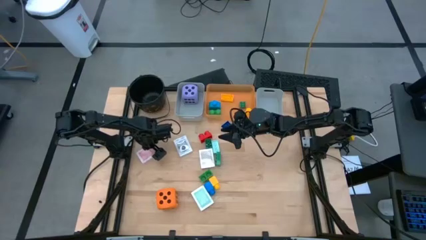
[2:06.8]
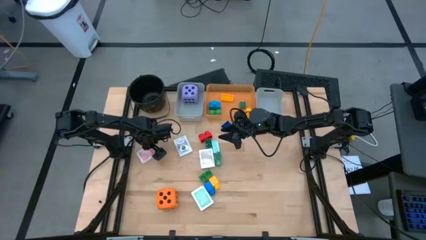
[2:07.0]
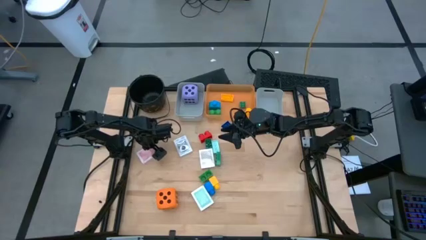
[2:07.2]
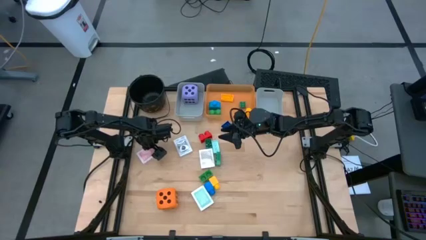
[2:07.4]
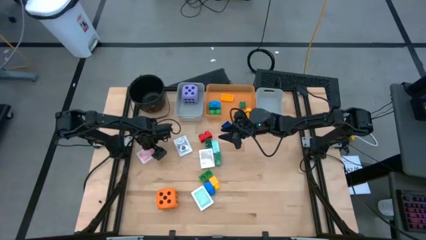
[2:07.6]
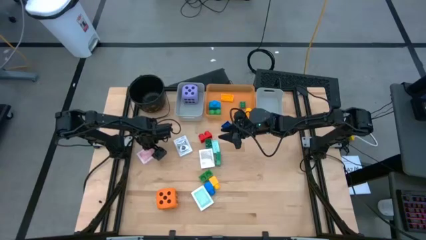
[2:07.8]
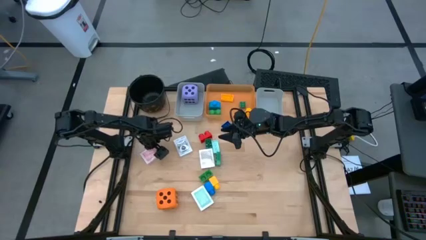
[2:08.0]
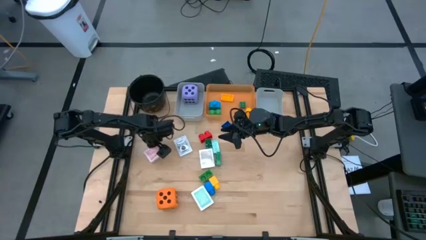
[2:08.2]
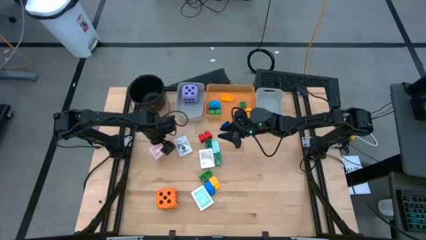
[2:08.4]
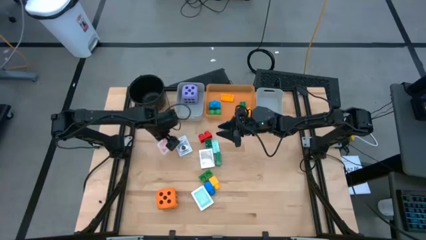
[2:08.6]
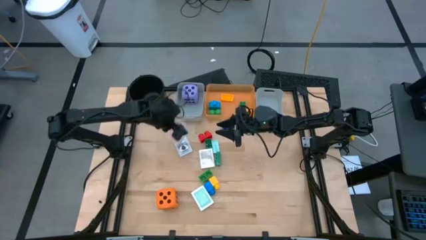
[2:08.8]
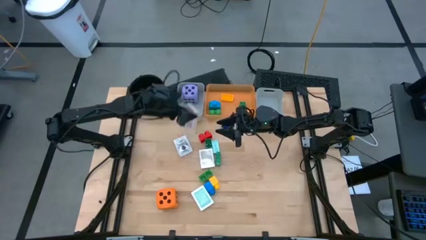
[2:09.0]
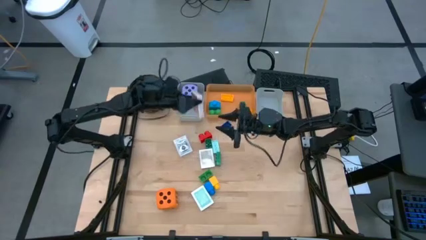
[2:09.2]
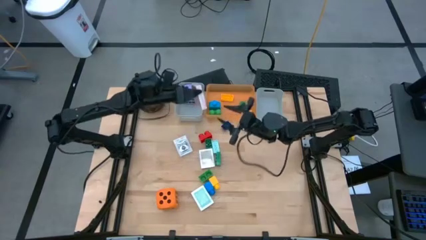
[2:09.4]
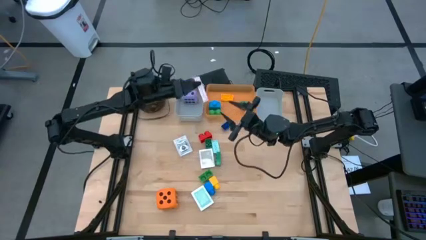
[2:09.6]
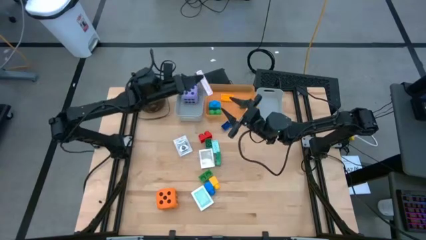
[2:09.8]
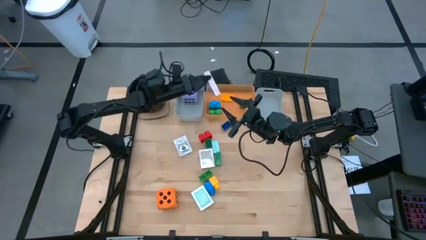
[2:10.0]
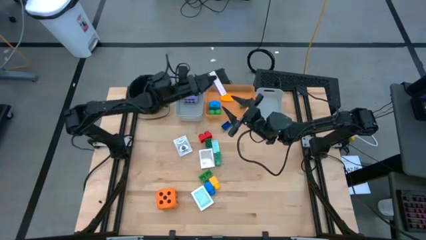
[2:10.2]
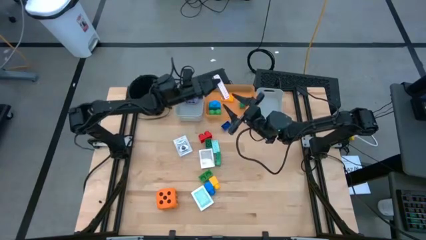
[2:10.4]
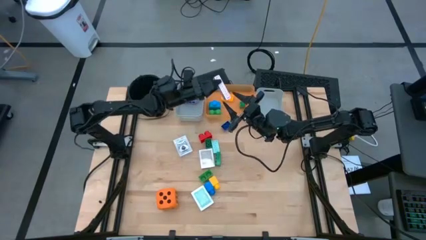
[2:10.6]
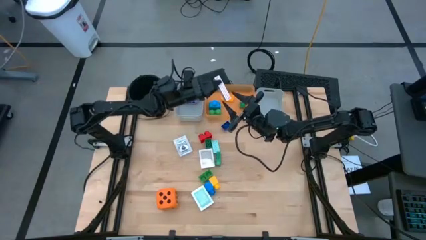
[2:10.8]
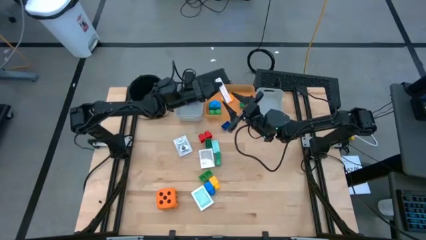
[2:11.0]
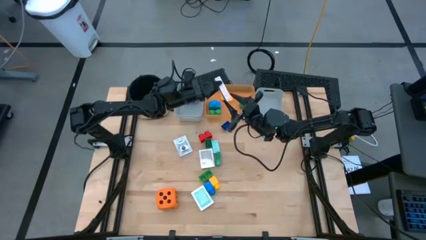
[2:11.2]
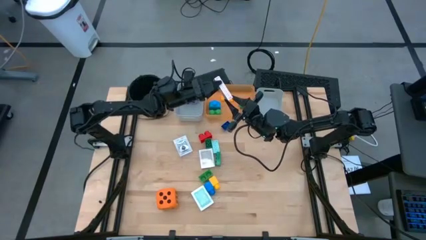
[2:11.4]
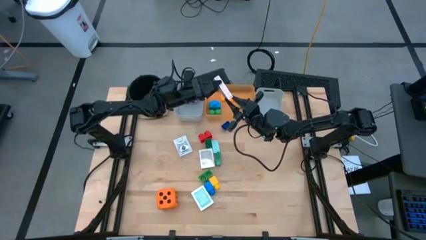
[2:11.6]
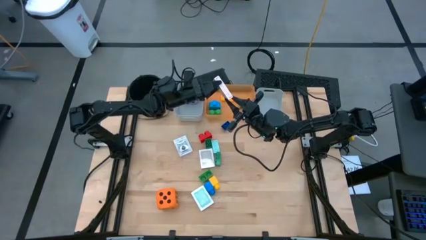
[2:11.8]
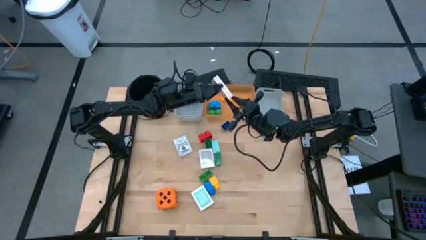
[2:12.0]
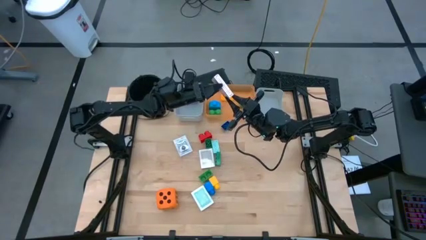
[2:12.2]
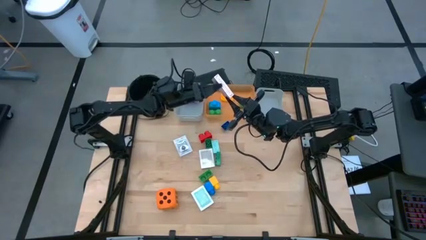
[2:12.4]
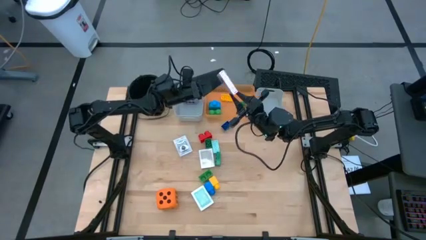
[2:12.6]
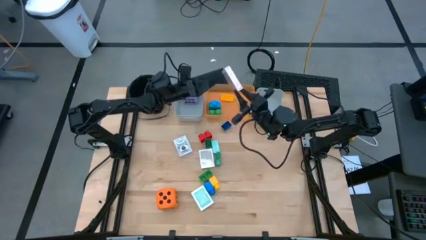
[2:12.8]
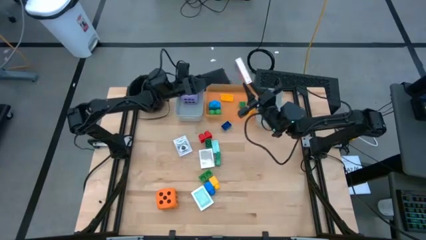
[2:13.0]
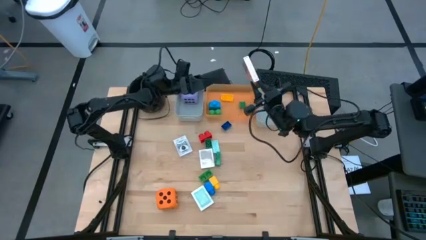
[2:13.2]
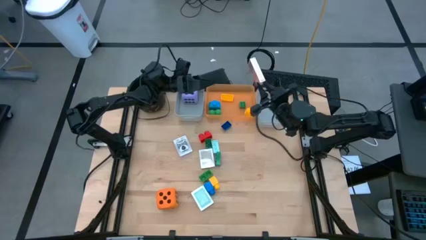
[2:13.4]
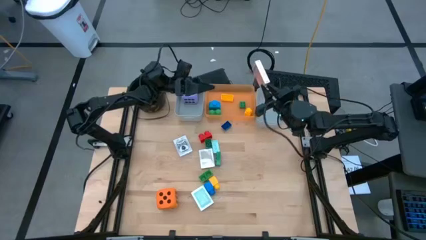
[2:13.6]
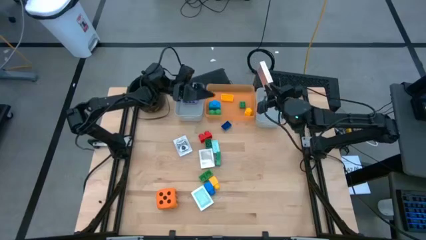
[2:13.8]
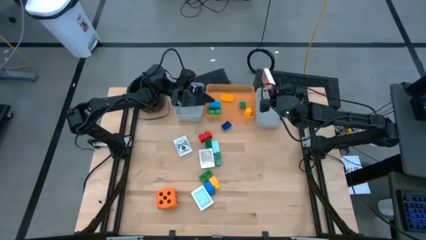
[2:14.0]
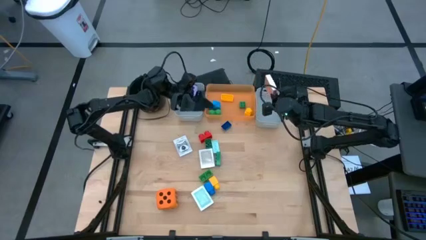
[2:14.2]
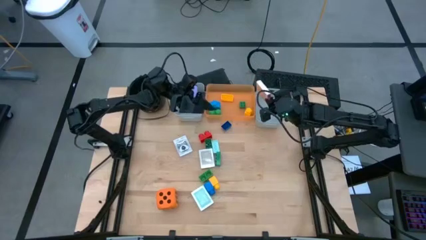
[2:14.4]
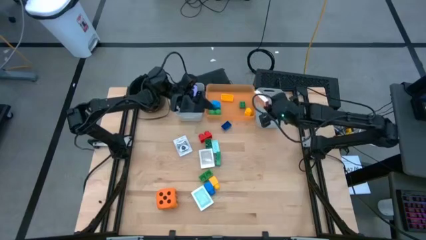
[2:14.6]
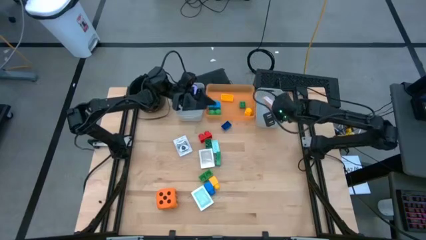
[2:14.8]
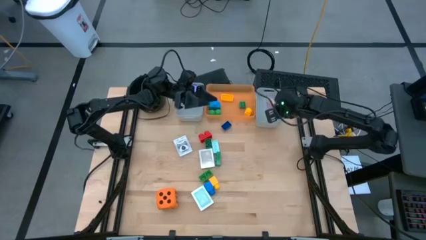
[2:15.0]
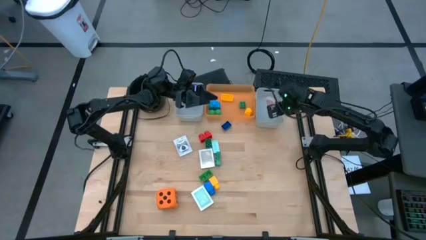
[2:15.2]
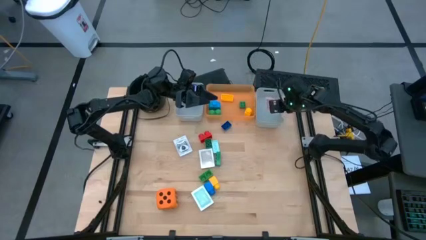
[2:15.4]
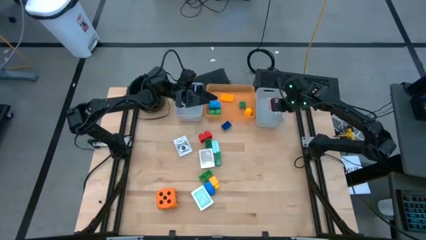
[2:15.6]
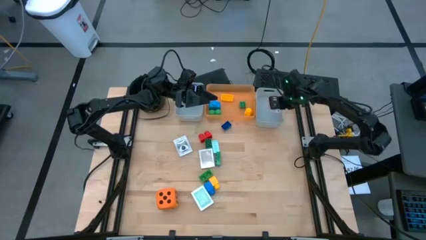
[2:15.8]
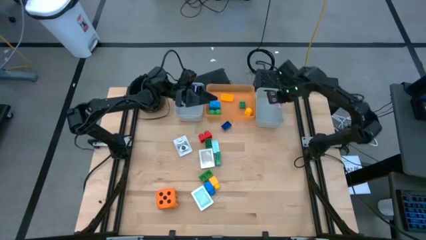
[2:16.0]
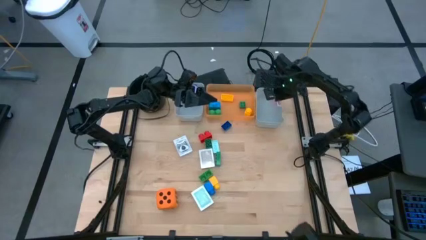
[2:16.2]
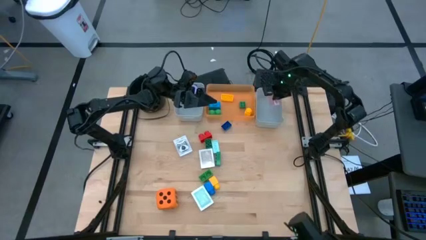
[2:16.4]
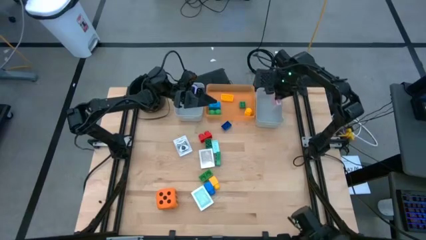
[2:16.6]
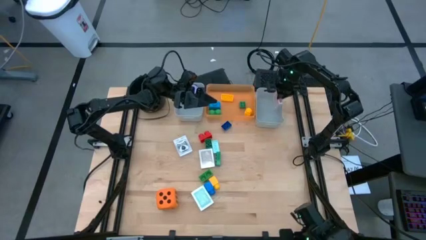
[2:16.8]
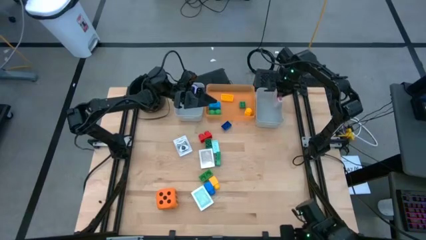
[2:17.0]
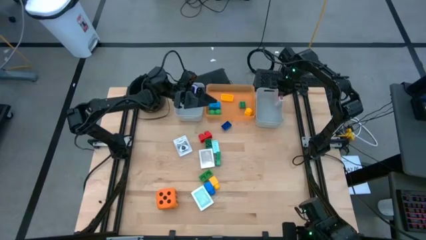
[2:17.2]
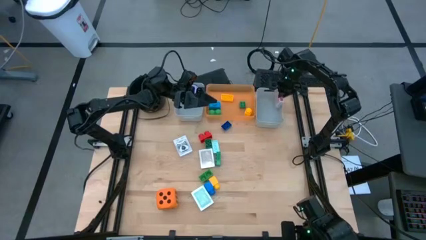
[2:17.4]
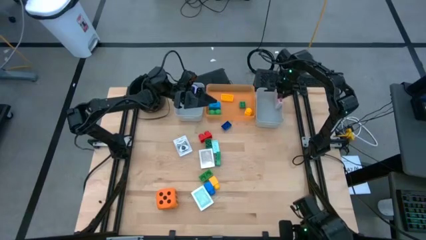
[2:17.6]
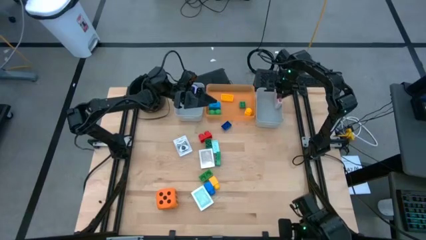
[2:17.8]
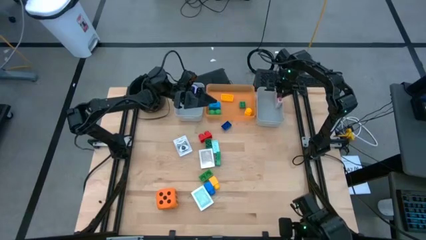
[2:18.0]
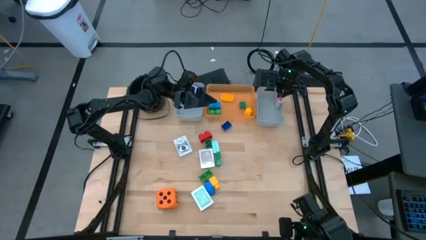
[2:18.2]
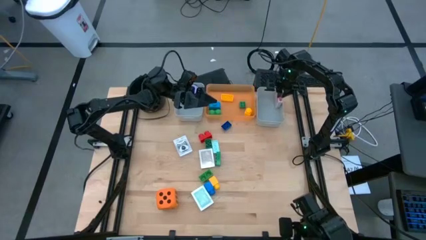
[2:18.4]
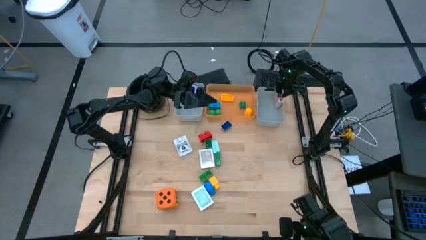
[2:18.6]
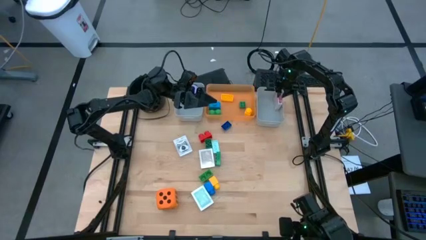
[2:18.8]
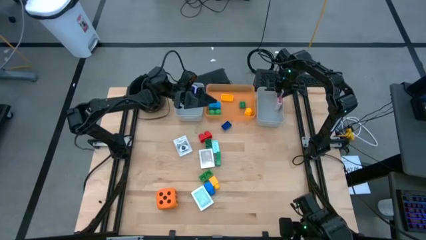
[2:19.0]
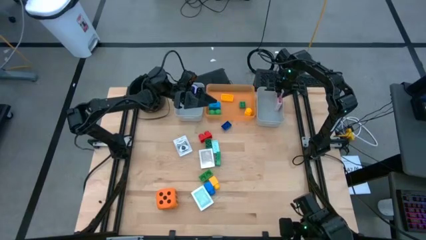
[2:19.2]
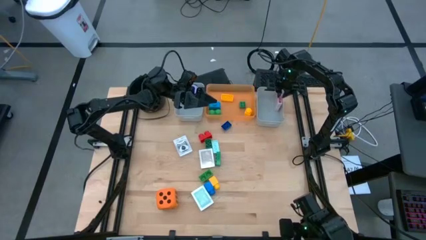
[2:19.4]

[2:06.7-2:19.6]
Task: Pick & Place Toys
Put the red deck of cards into the right gray bin

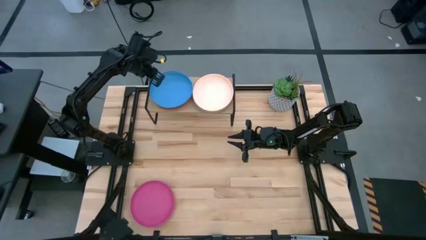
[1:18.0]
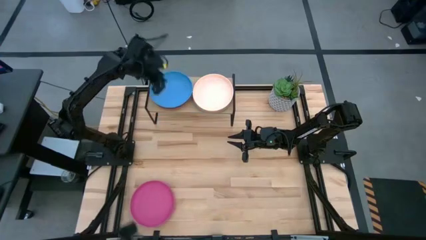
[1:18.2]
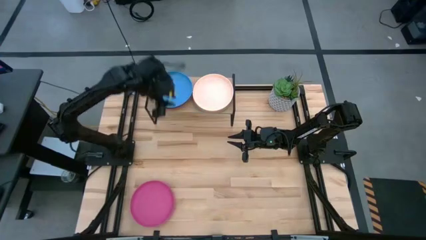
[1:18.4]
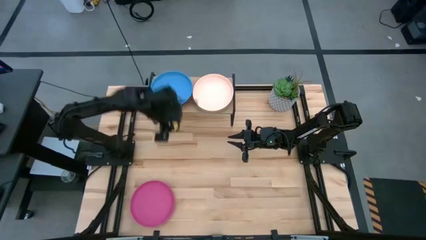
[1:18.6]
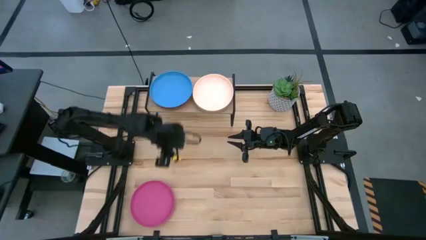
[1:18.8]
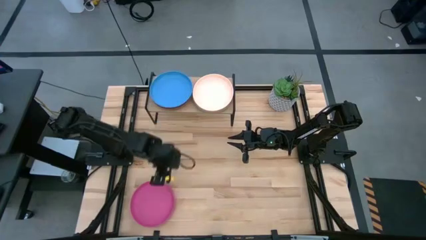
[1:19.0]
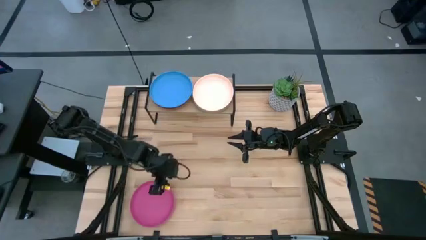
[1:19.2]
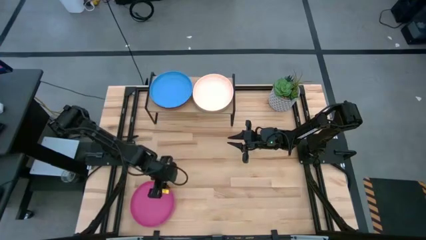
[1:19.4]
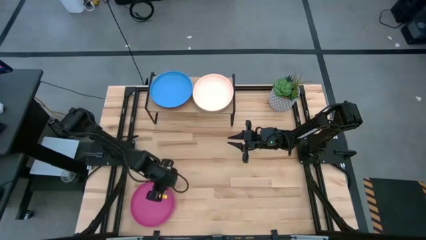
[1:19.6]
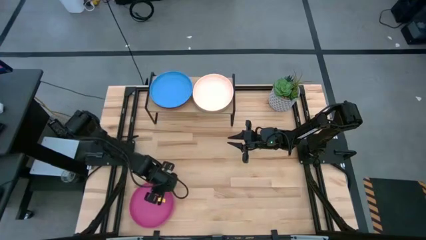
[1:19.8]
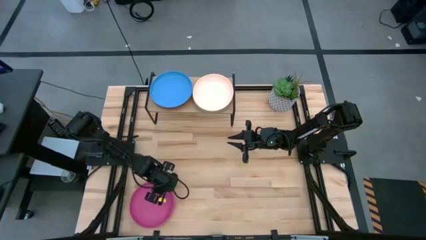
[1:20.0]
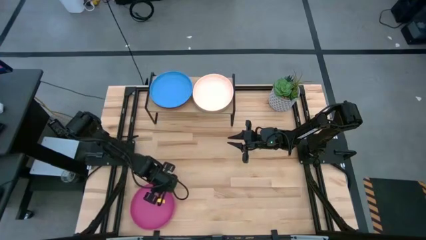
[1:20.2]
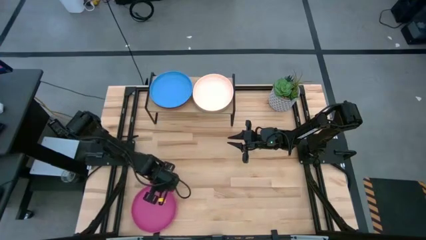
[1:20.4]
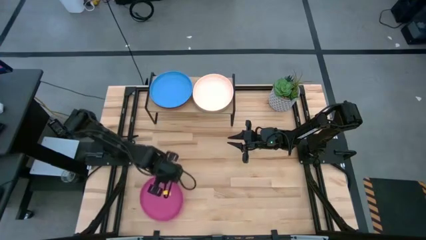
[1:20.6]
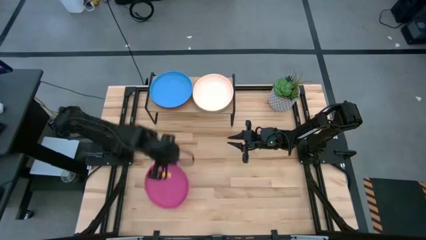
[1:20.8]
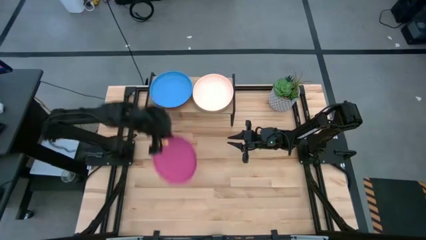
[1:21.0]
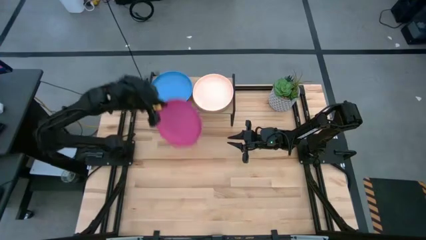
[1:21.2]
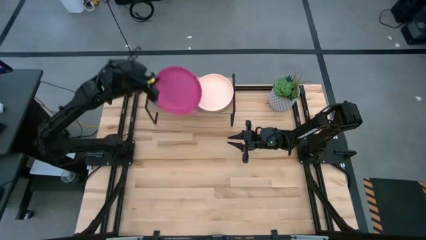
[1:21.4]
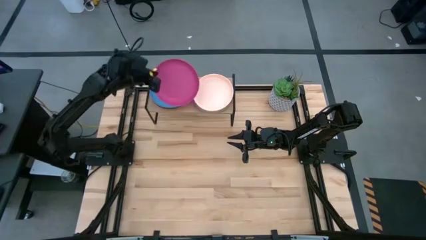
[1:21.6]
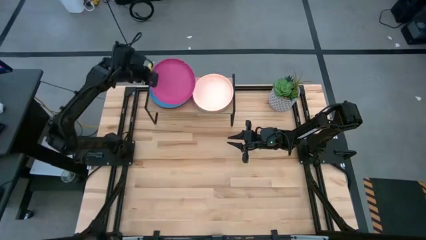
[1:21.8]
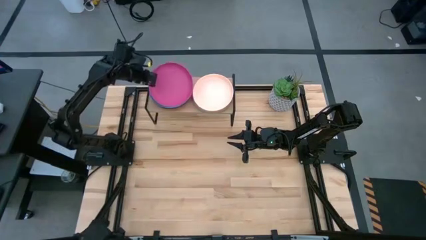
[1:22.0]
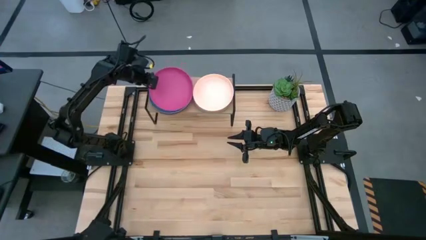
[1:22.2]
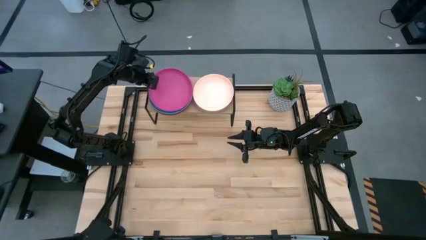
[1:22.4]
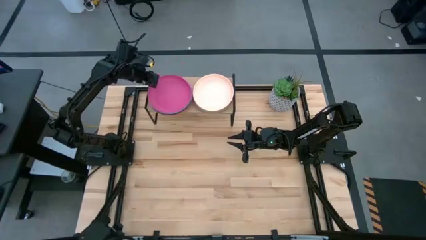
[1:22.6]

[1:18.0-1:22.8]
Task: Place and stack plates onto a shelf
Stack the pink plate on top of the blue plate on the shelf
